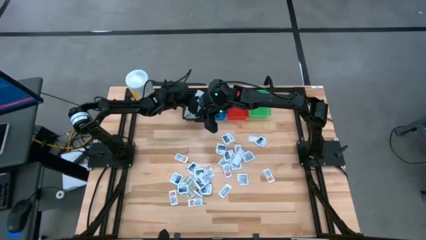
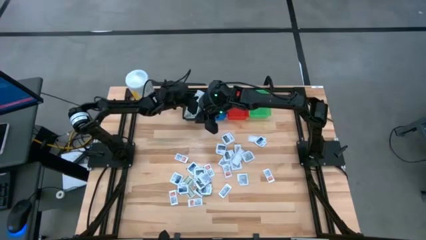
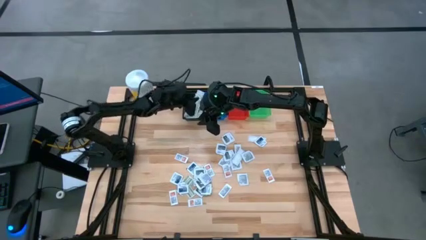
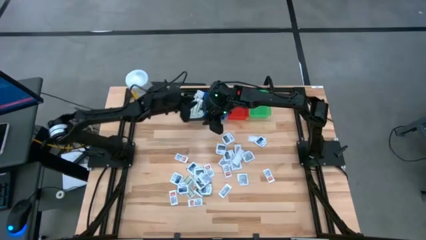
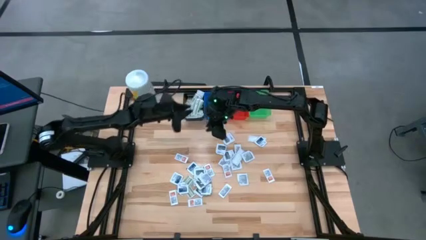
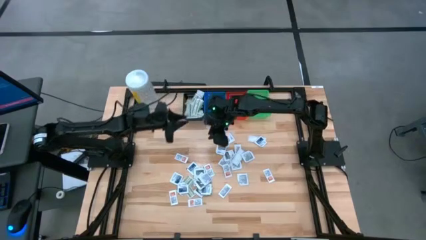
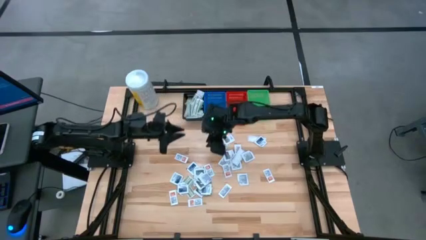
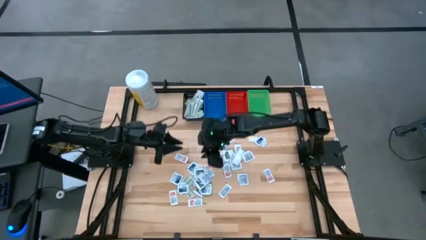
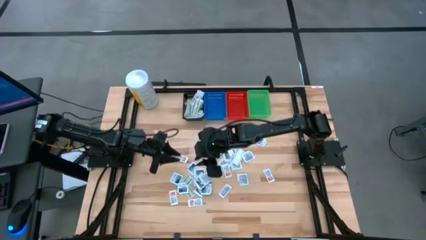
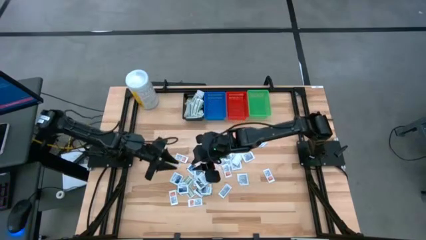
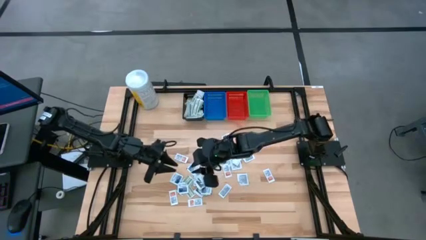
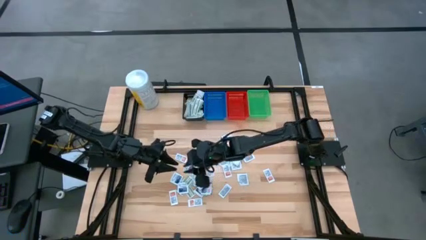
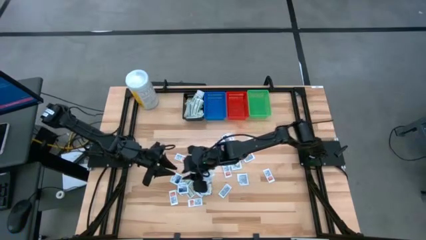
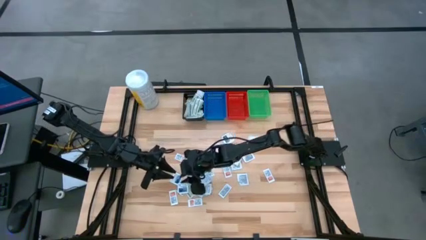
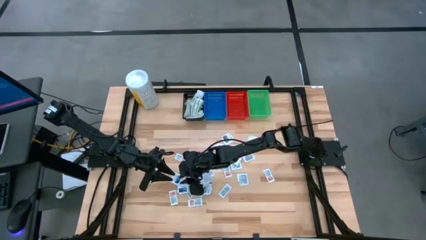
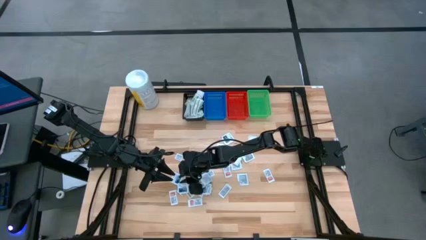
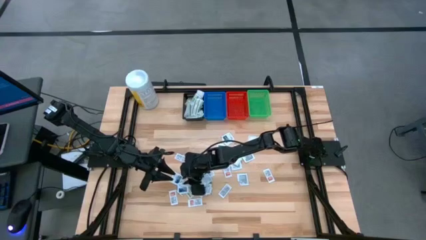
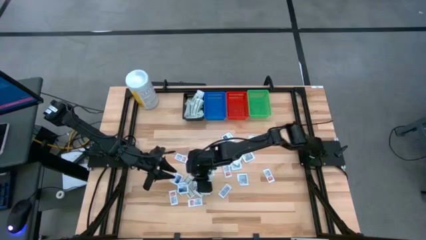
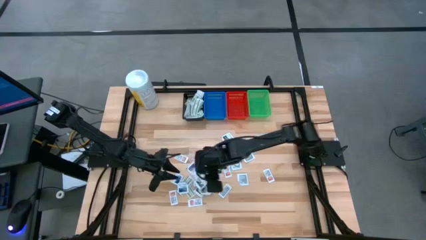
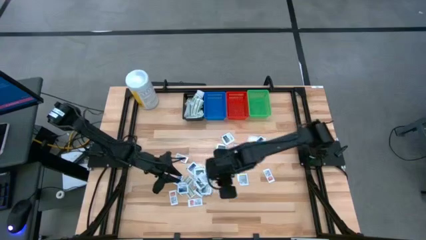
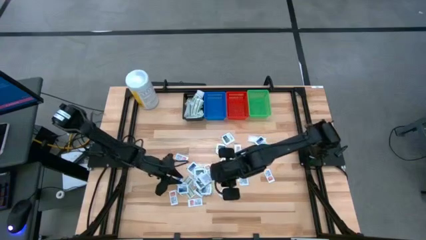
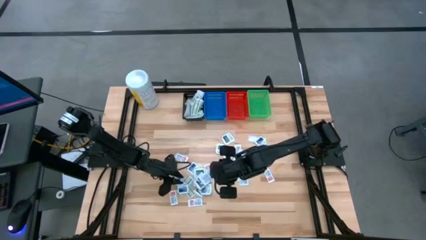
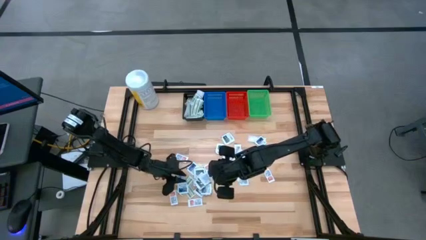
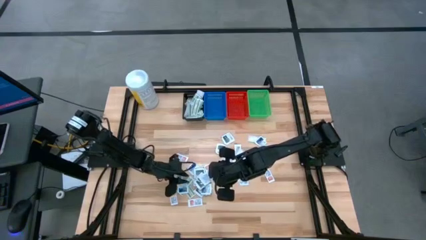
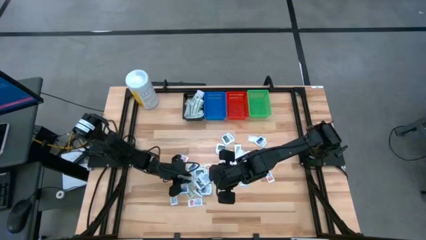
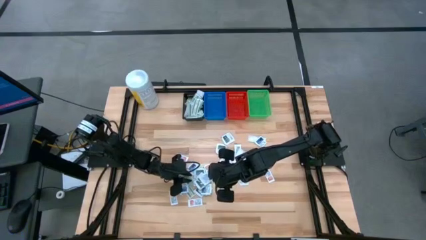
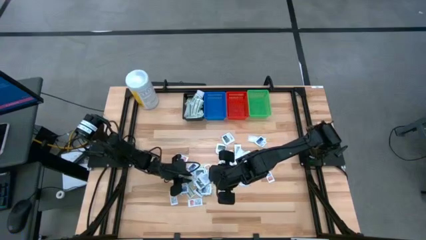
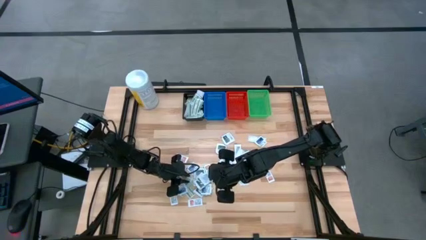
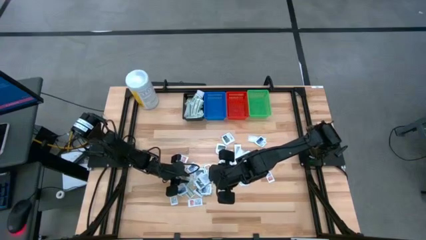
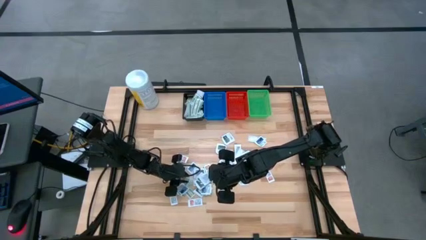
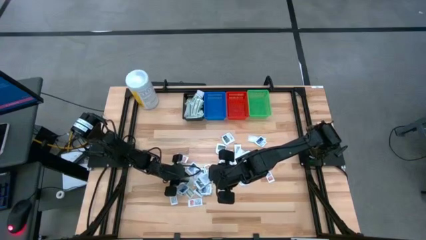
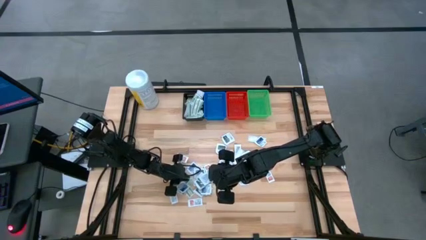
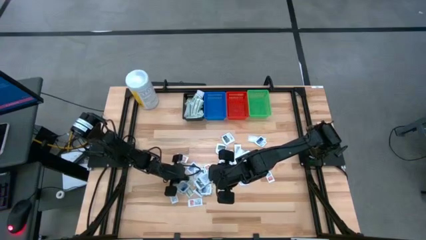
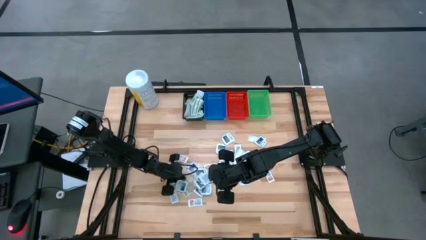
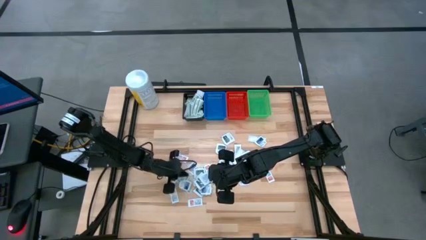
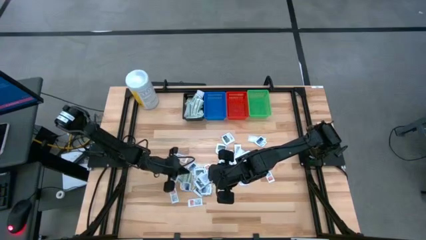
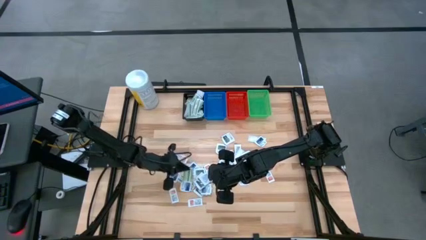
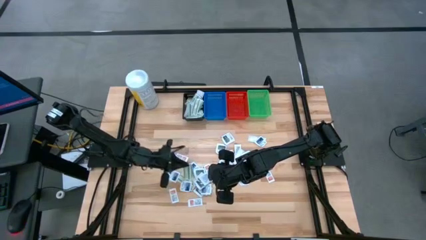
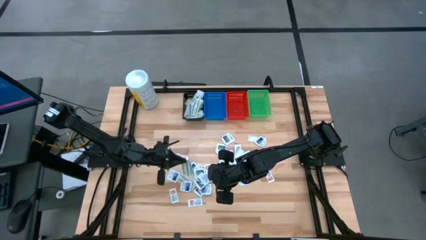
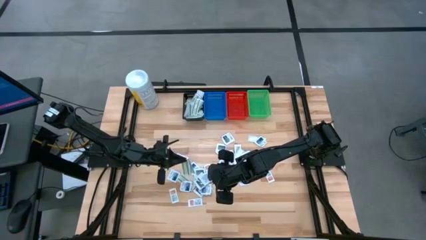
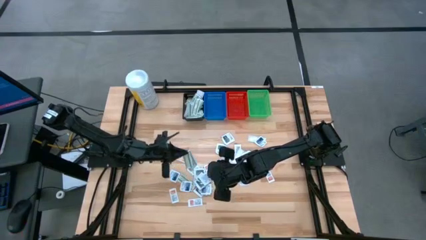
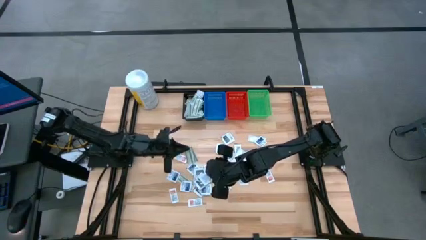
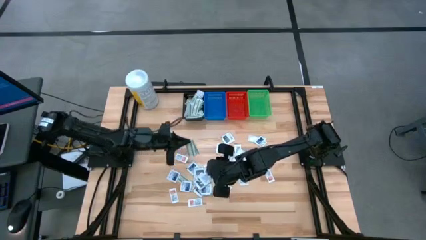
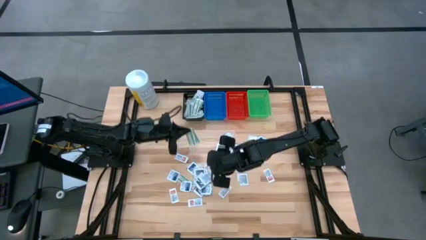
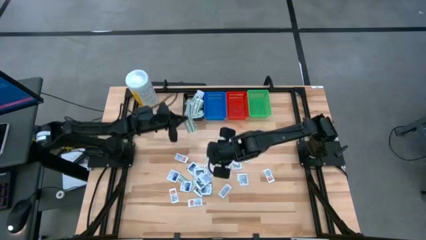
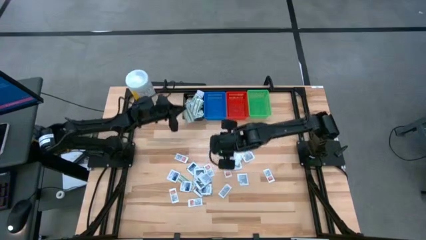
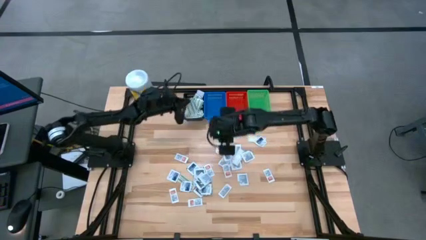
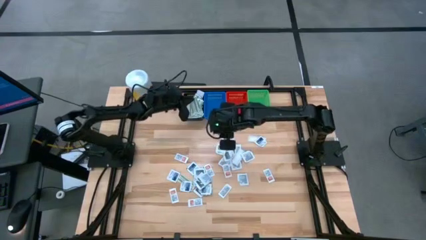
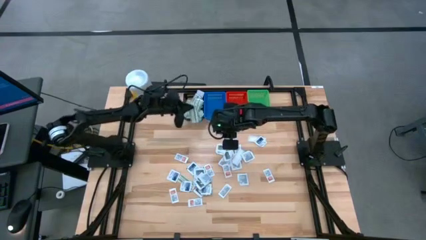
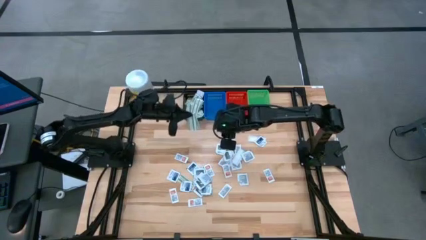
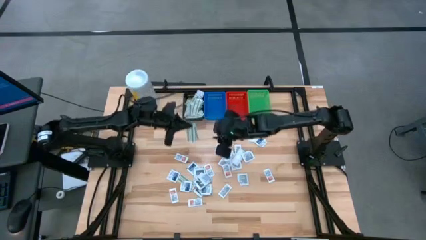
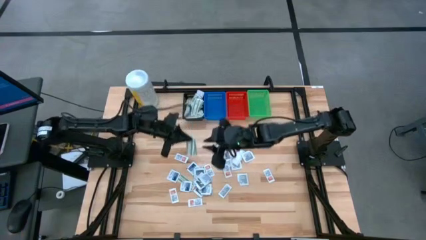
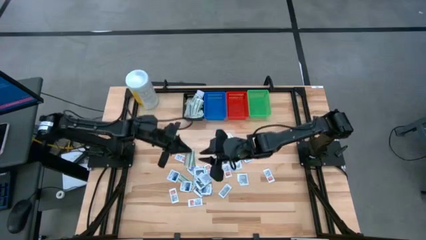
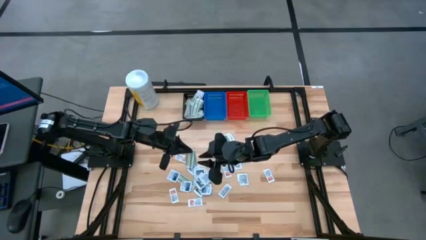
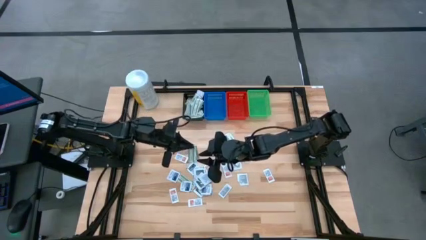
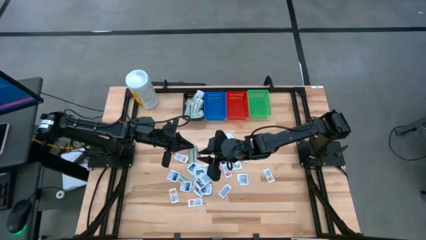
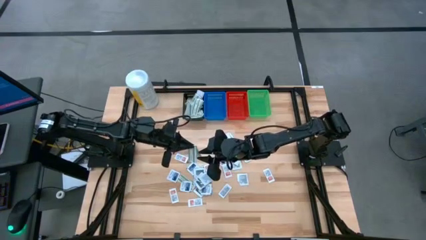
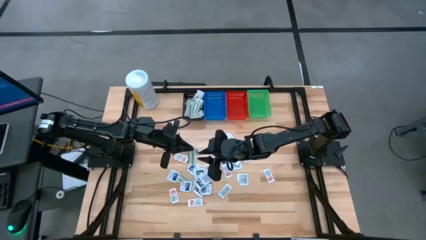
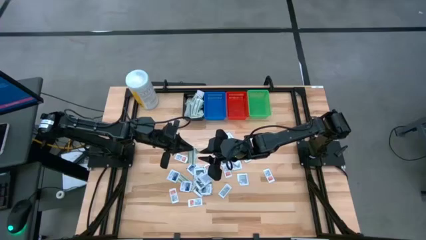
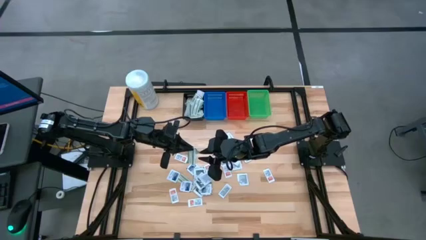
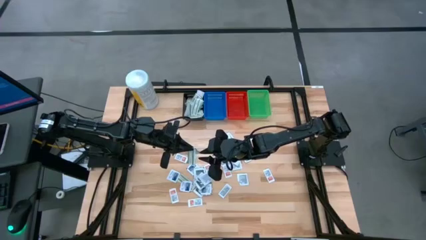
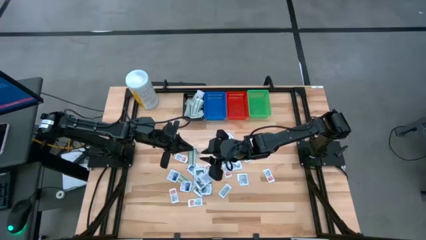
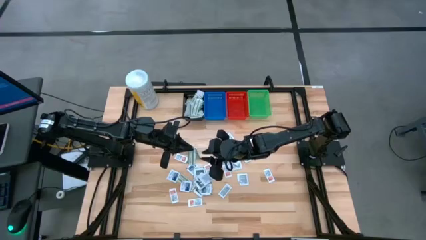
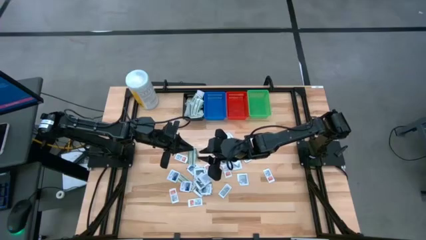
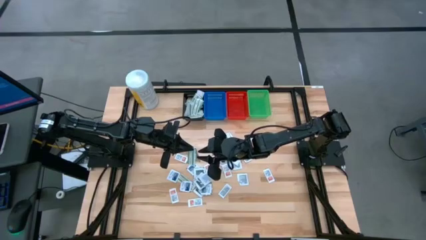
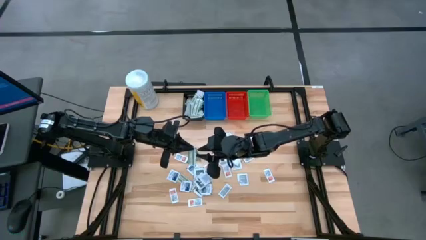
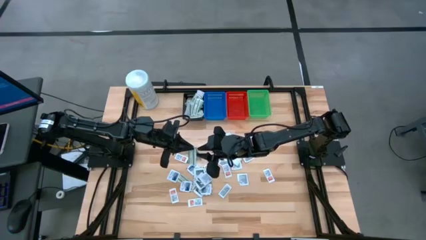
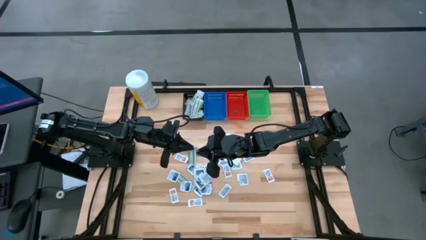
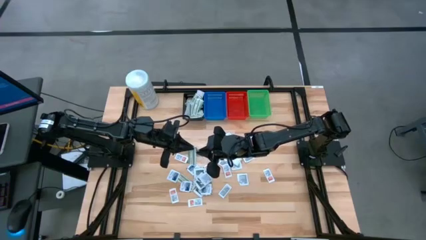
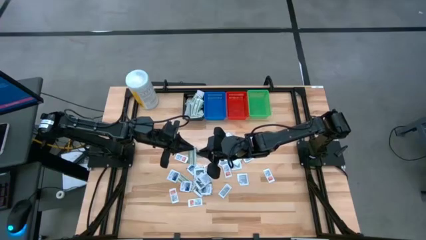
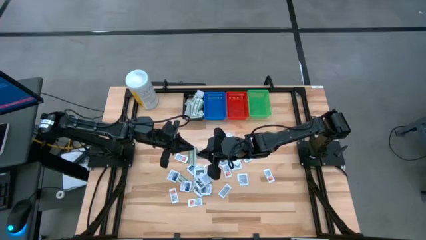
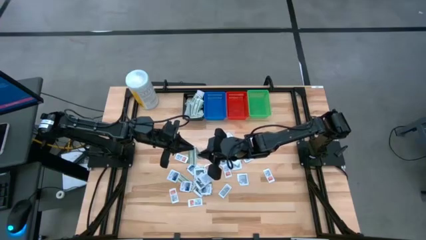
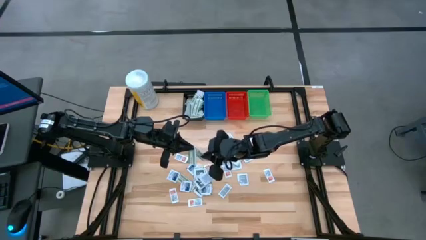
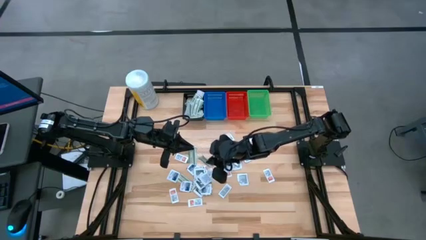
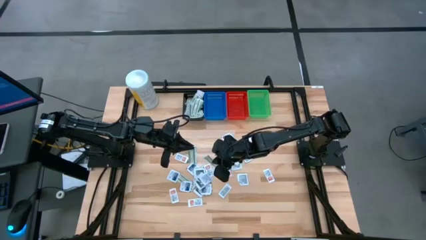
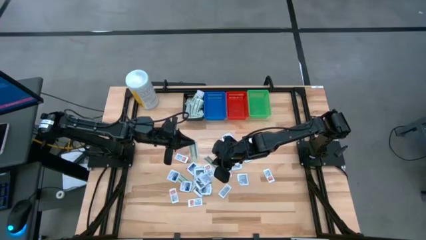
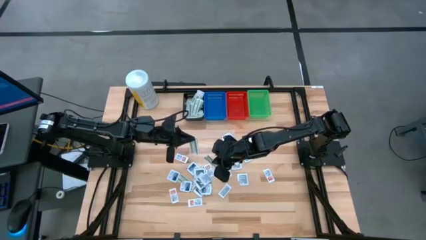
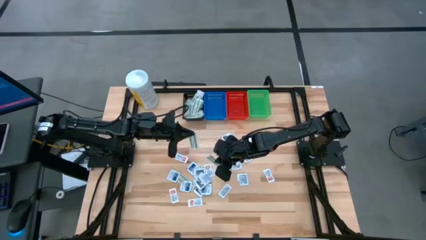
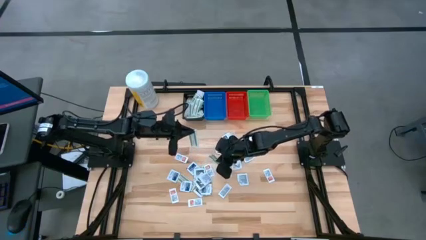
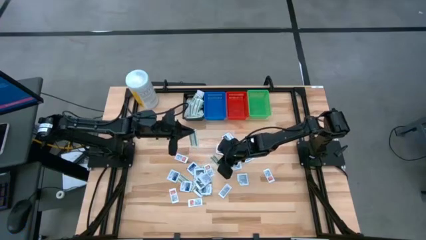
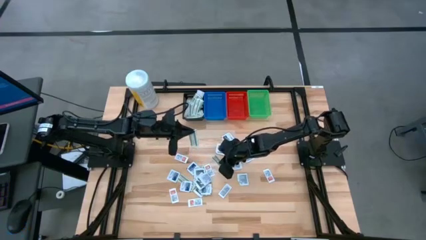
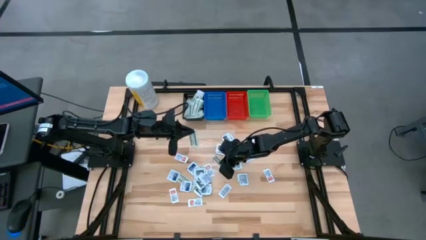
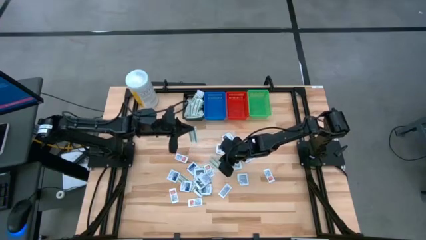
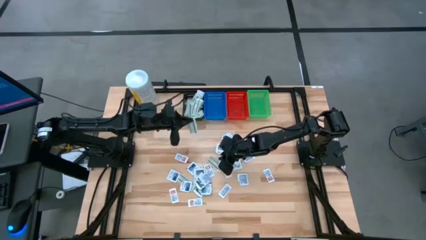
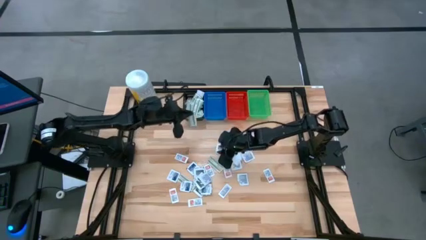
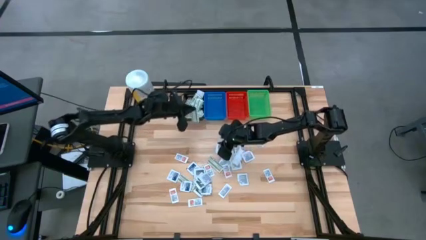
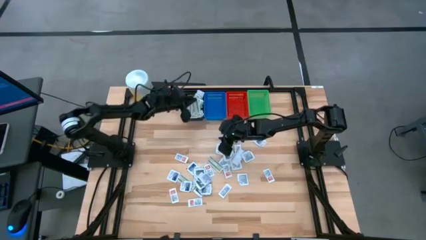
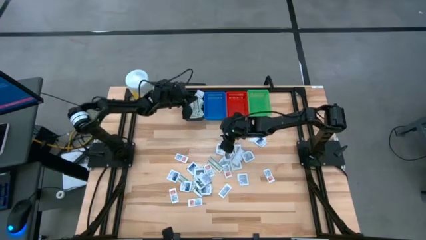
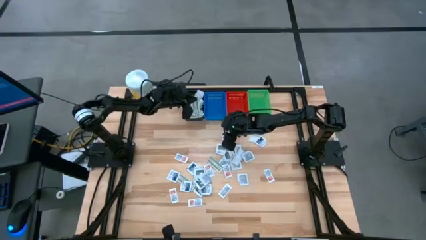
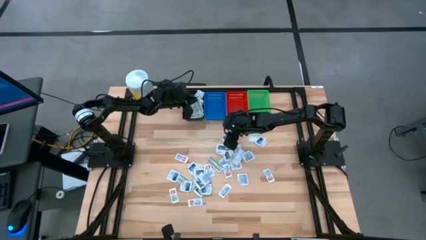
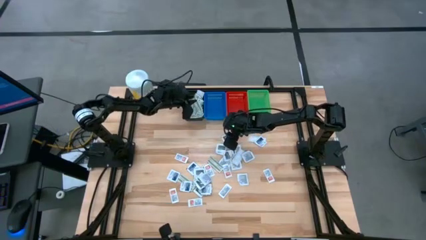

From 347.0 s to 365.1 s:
Task: Pick & Place First Aid Supplies
Put the green bandage pack in the black bin
